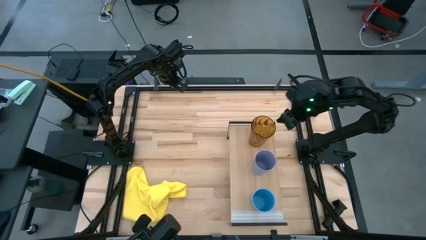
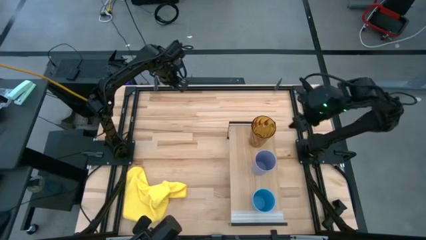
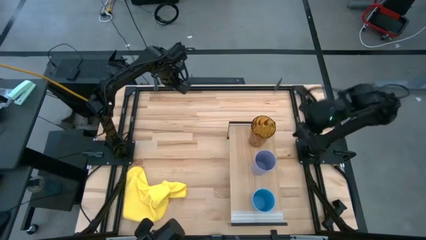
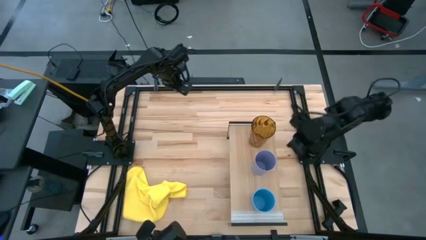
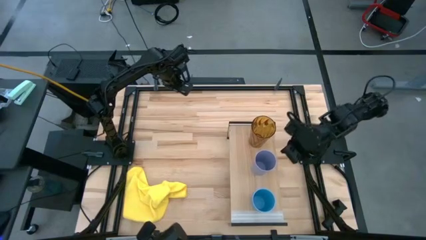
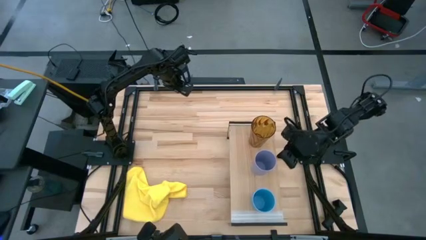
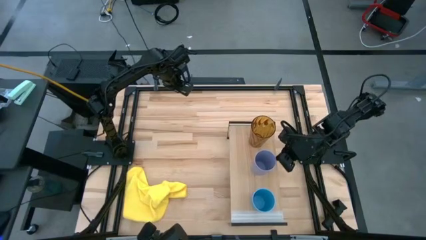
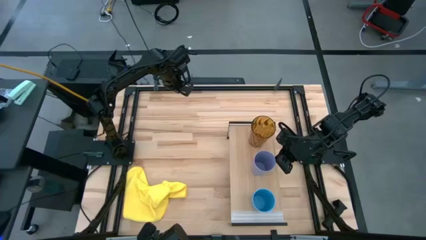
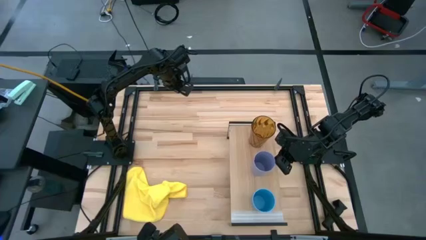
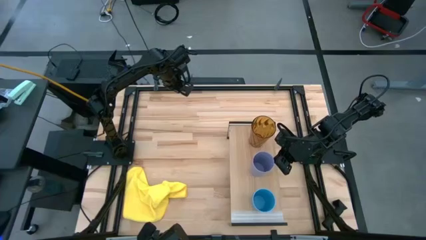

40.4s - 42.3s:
Task: Stack small to large cups/mugs on shelf
Adjust the purple cup on the shelf

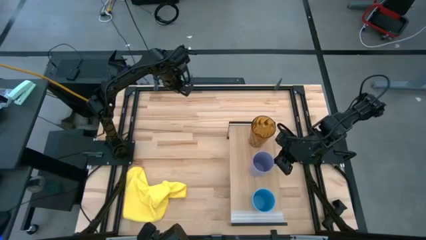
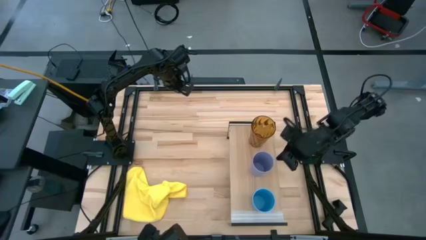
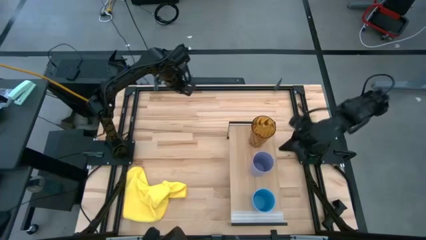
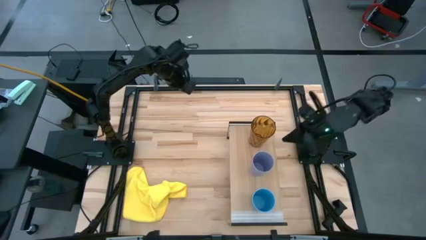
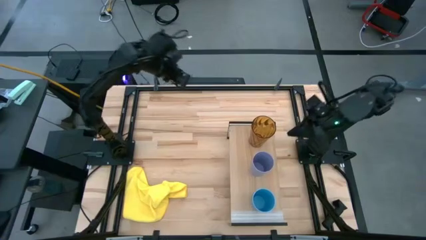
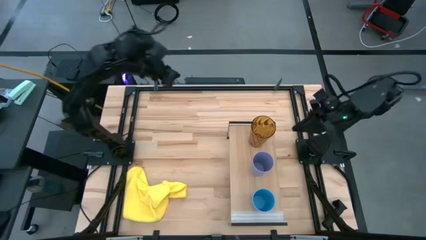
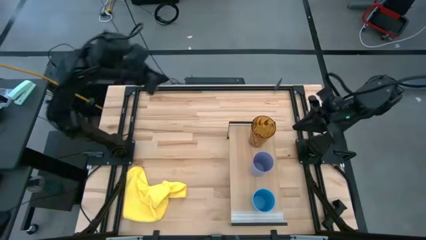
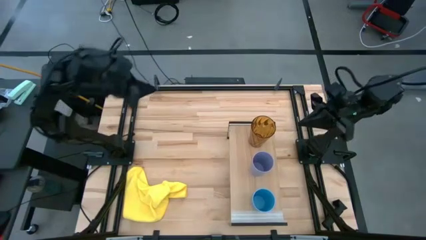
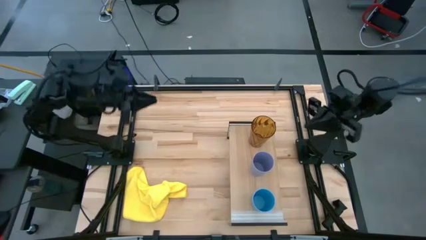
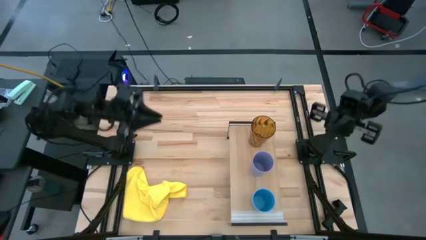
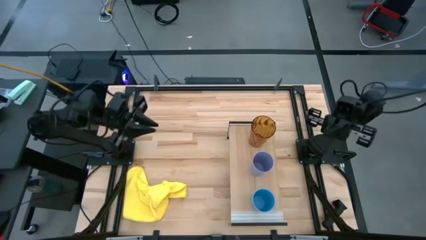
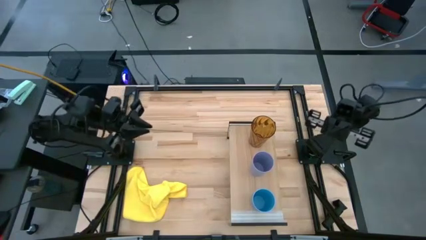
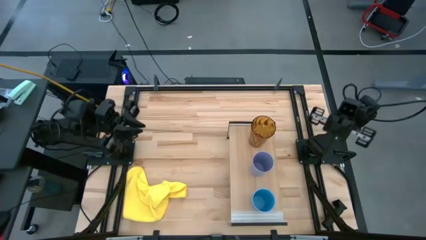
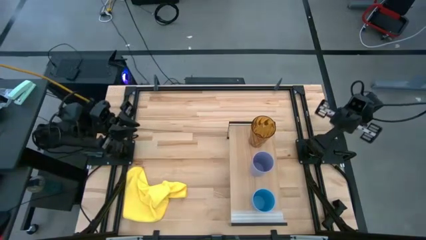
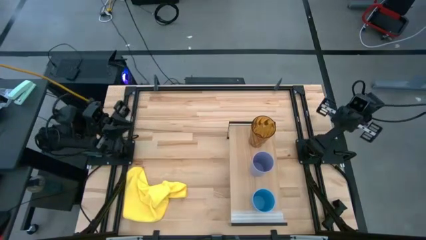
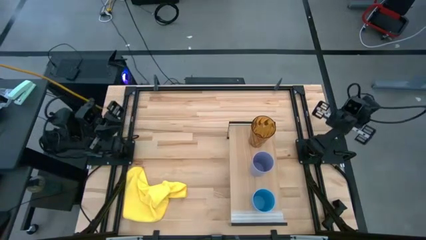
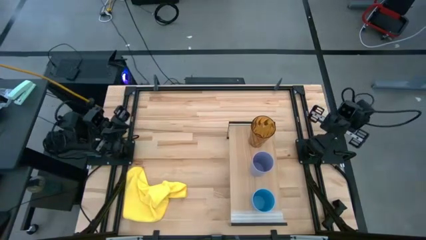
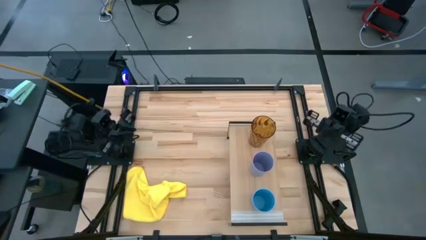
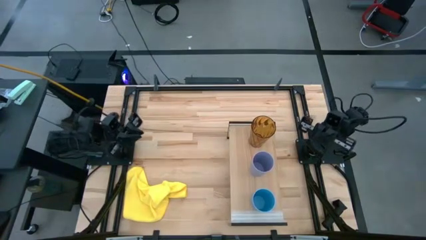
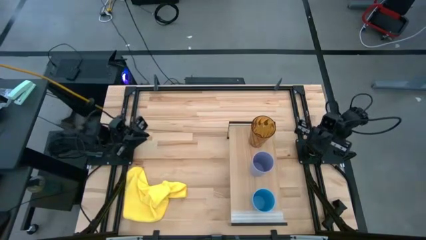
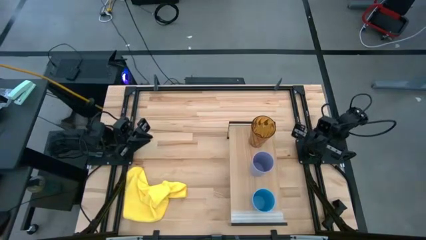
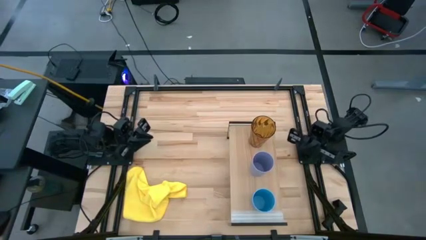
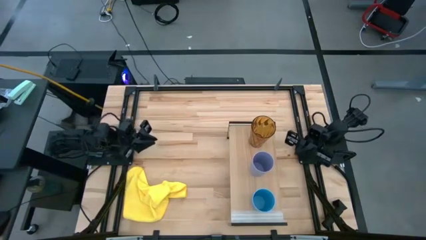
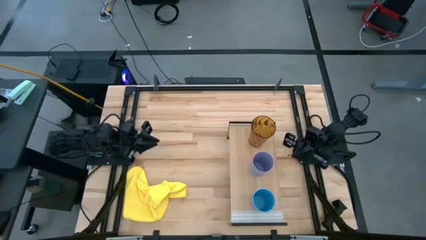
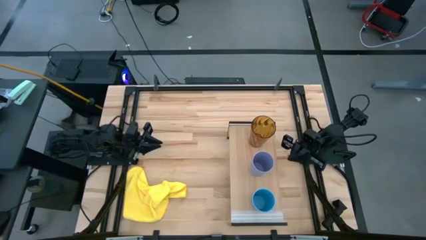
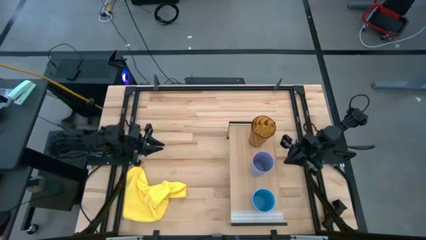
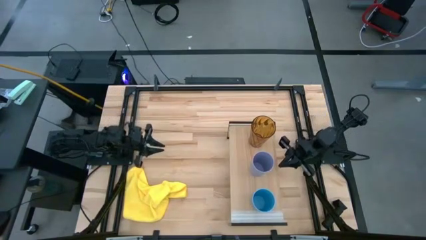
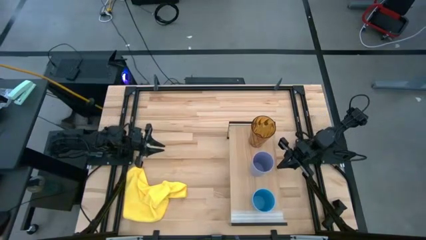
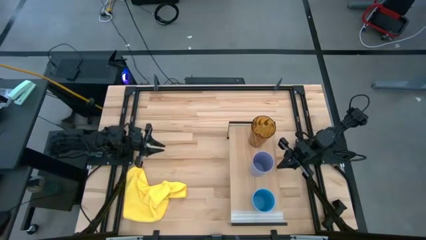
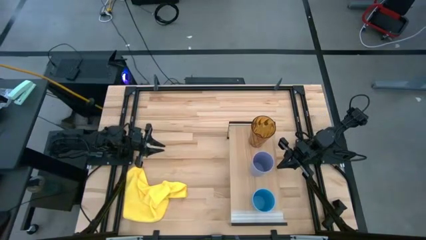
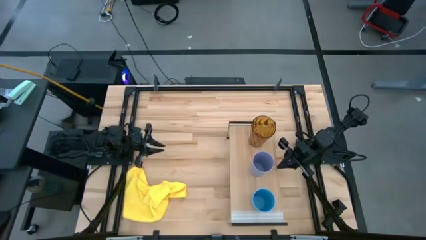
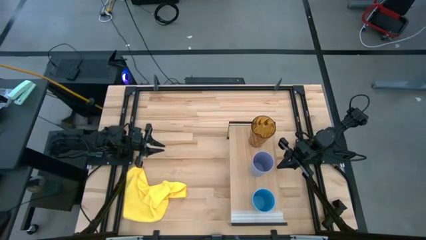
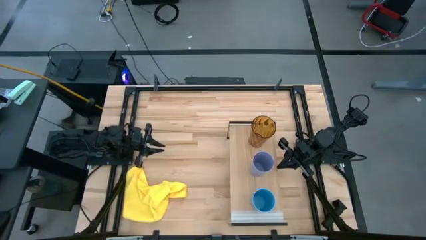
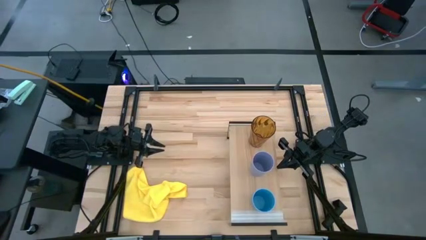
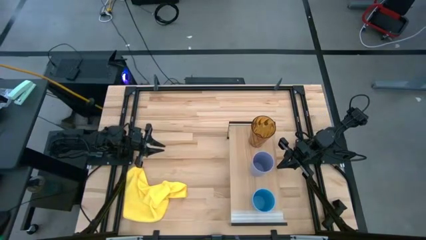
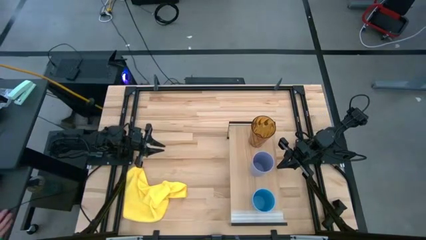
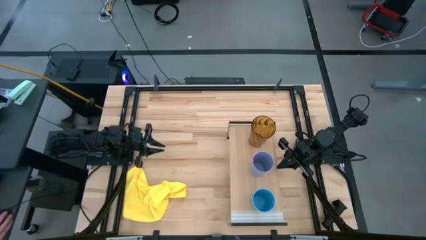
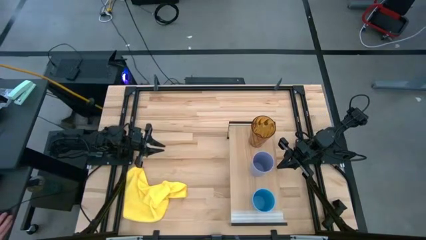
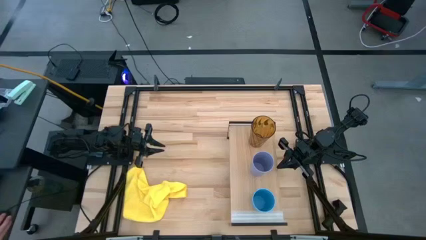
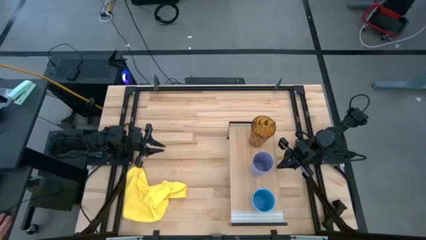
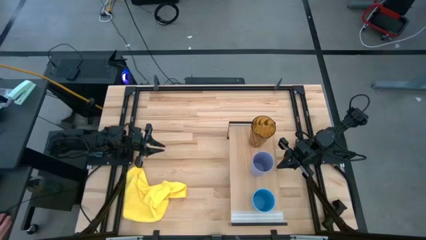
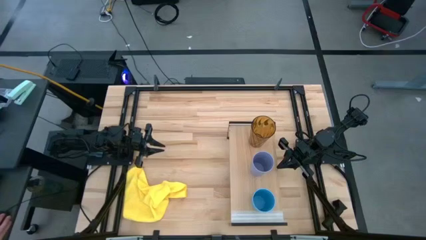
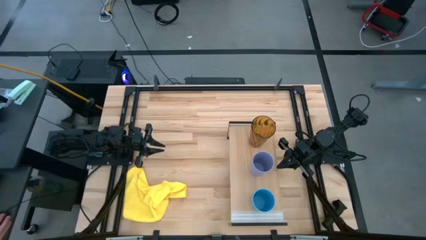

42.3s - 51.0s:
Return to Home Position
